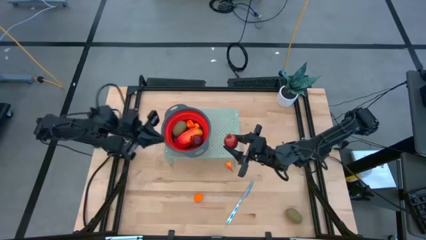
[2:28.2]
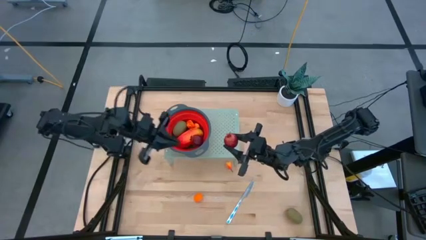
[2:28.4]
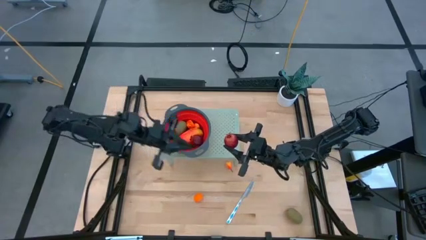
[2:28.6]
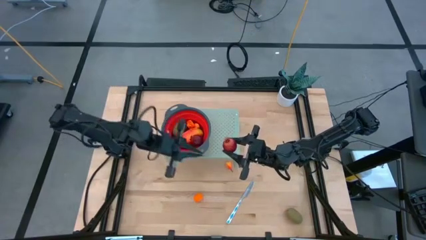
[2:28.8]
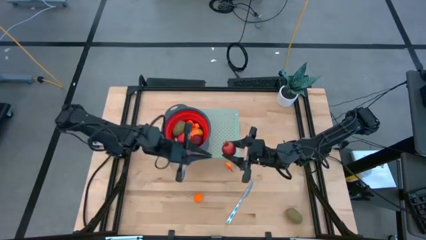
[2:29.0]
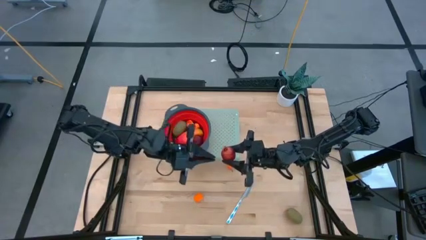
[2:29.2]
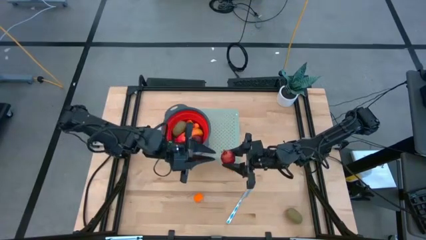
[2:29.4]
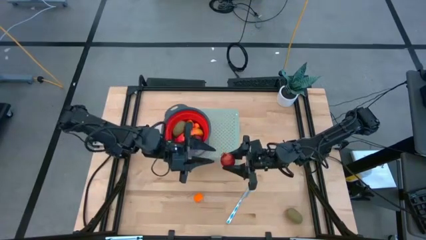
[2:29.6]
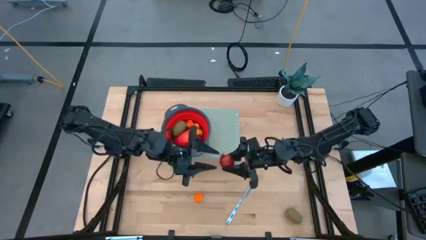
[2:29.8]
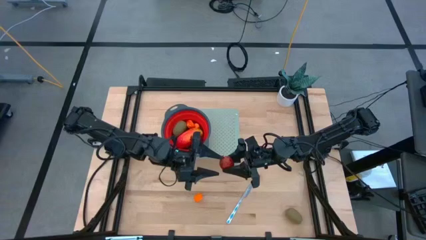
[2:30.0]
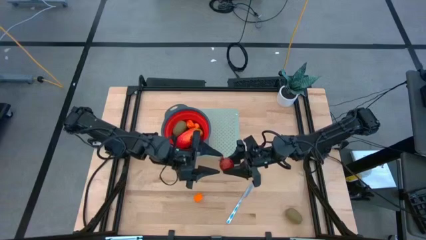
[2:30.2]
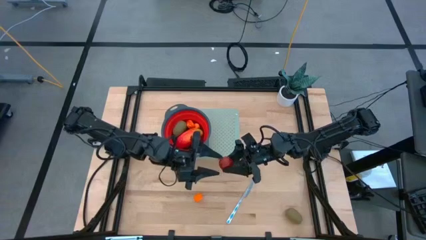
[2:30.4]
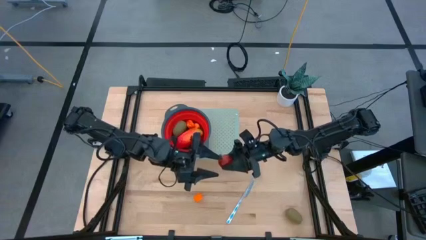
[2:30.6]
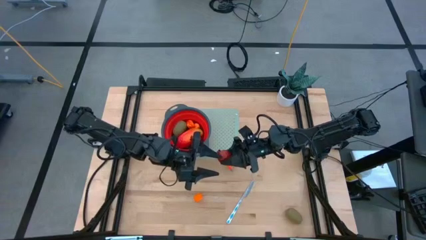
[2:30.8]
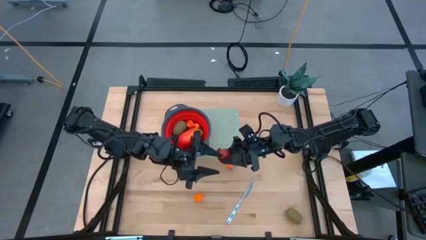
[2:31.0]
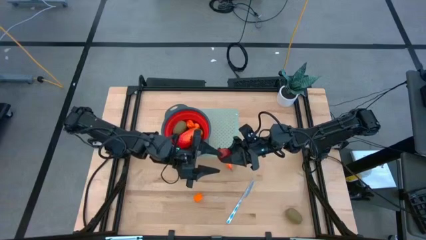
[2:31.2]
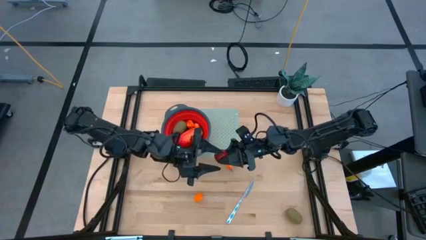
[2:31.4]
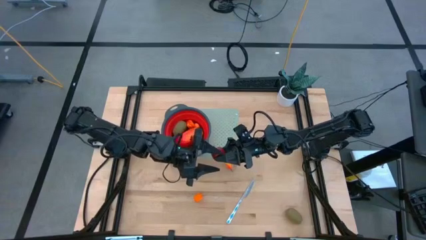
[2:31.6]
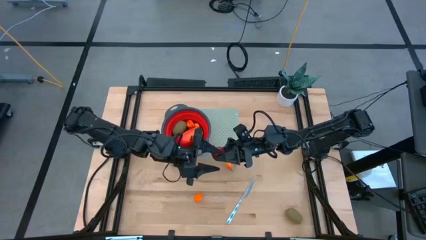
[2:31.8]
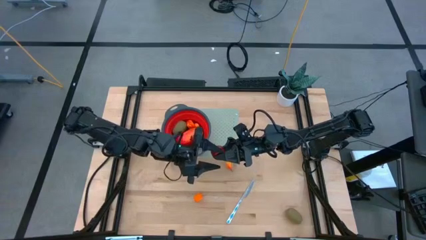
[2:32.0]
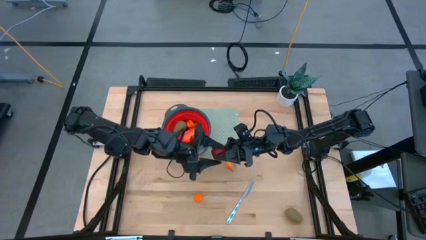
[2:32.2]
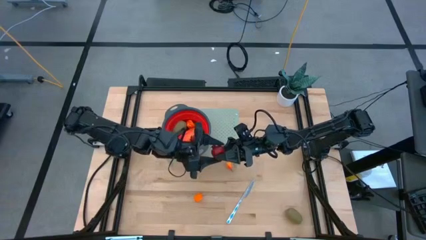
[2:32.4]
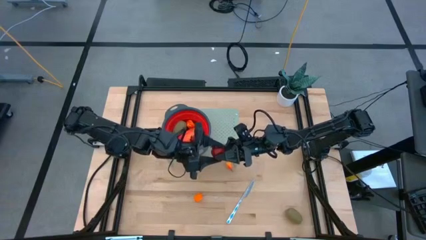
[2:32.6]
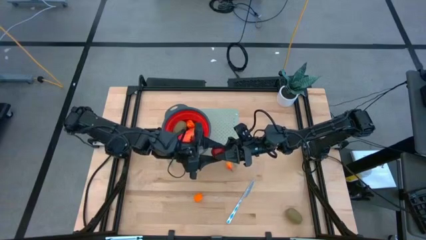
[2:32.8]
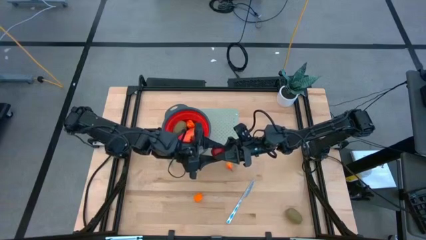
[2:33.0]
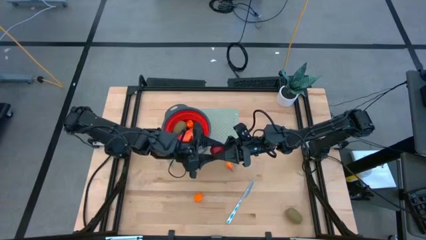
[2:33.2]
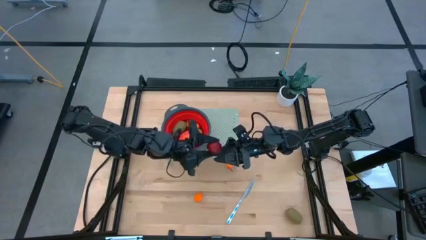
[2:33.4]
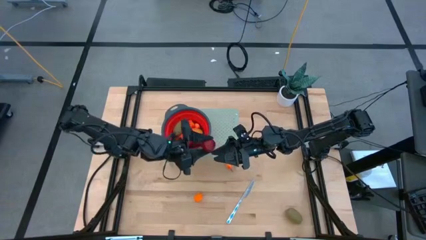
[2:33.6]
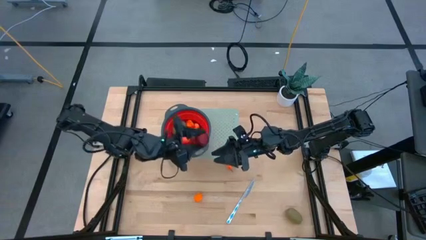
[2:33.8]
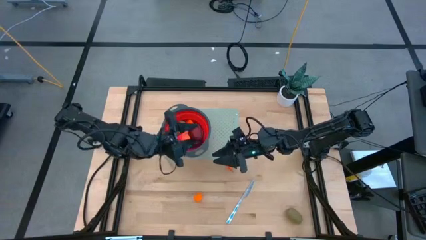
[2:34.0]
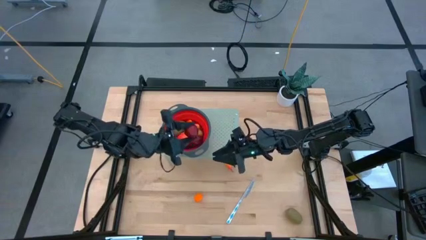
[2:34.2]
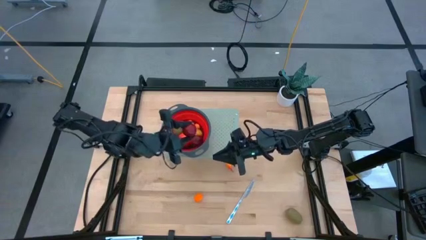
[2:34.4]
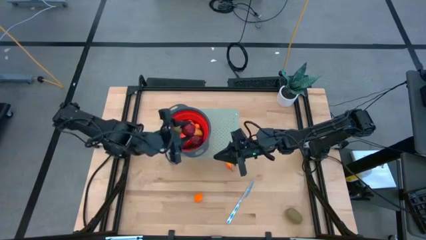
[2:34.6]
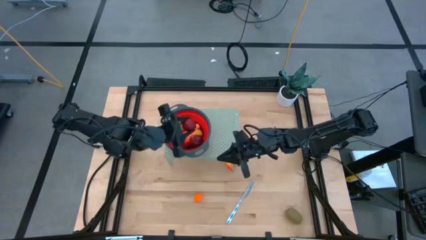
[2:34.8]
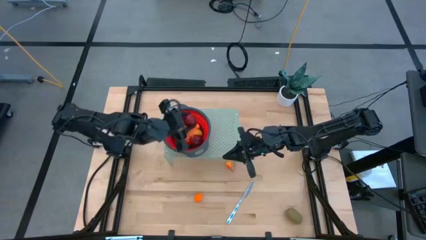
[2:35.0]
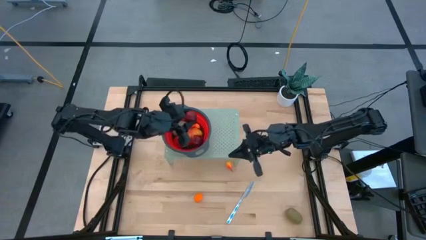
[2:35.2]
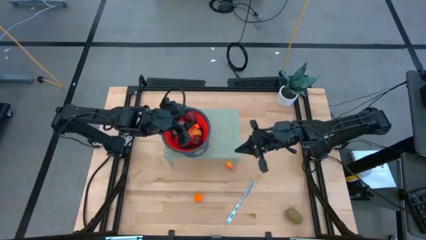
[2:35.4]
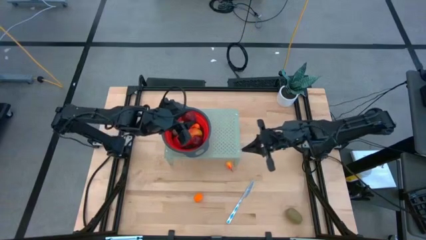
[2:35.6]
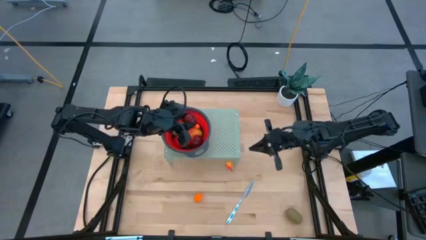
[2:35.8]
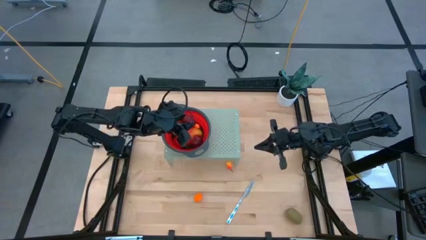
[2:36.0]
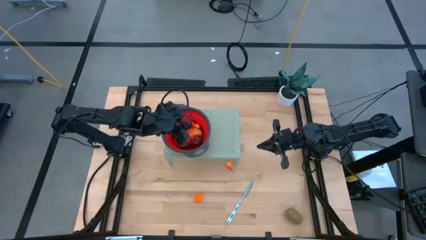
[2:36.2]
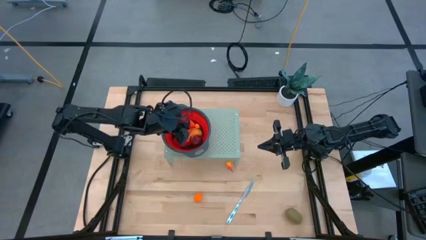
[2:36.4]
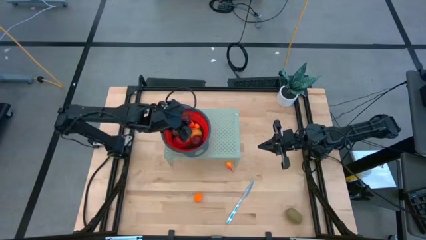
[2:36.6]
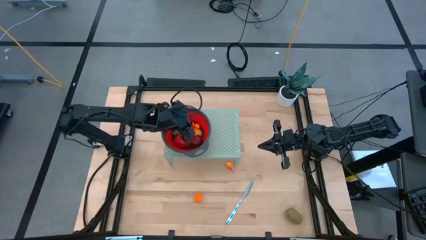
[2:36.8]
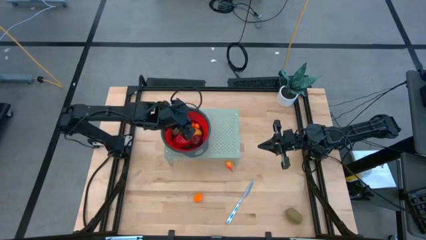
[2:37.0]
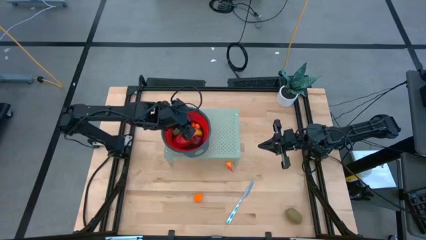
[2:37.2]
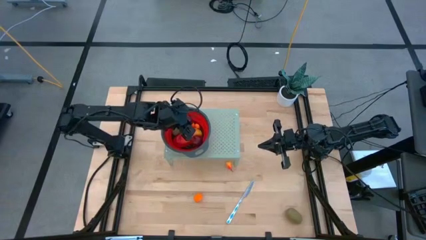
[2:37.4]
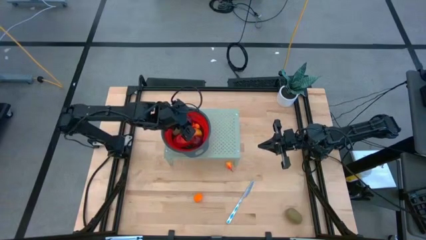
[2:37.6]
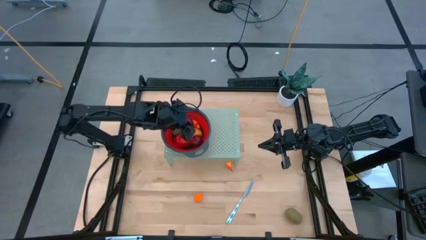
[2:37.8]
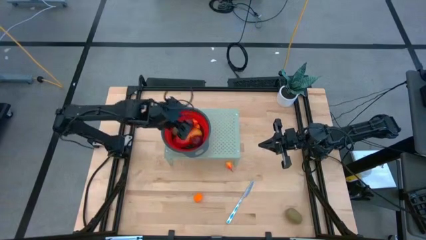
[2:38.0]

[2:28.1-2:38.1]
Task: Pick & Place Fruit
Put the pomegranate into the red strainer bowl on the shelf

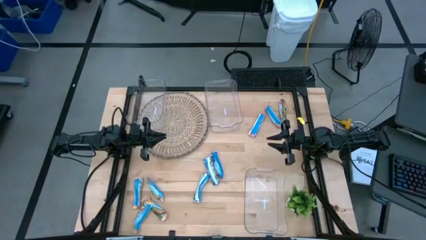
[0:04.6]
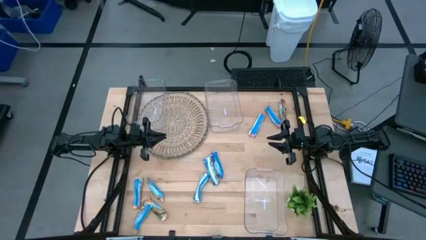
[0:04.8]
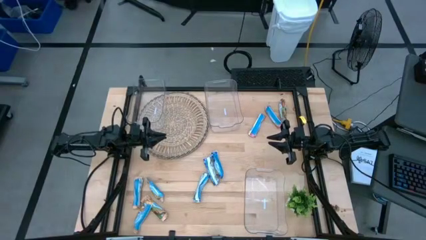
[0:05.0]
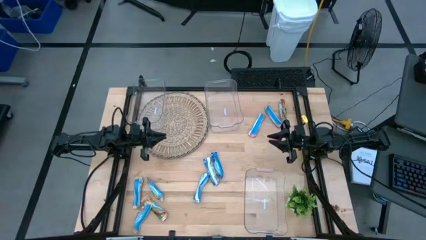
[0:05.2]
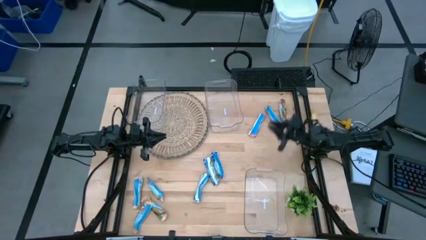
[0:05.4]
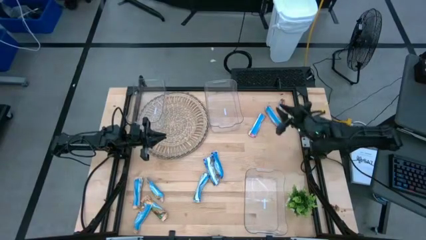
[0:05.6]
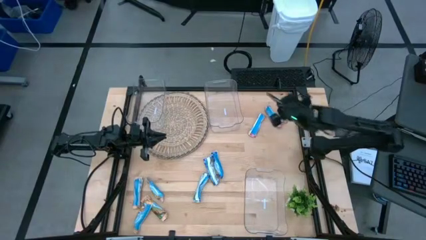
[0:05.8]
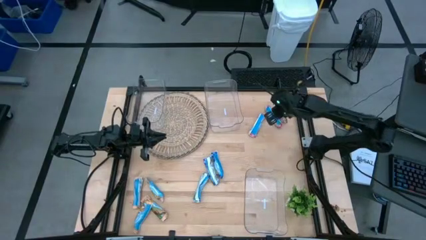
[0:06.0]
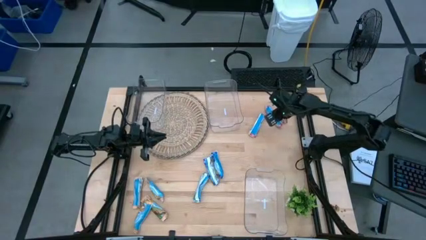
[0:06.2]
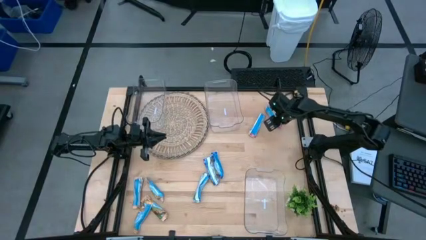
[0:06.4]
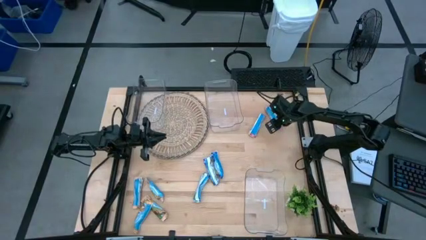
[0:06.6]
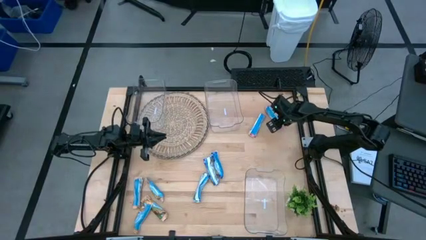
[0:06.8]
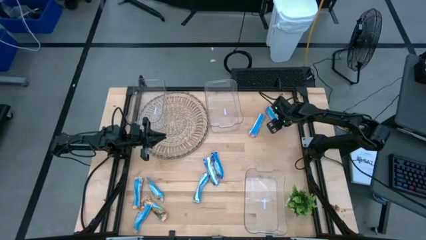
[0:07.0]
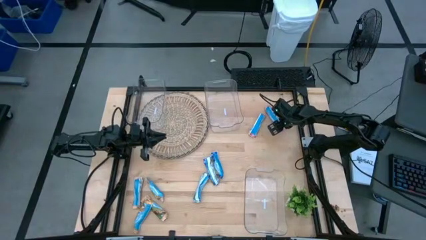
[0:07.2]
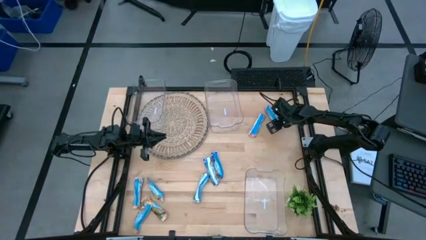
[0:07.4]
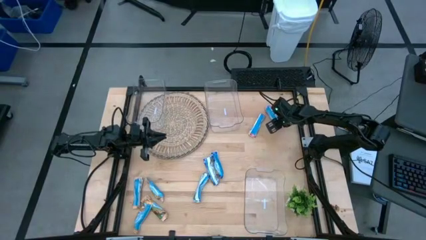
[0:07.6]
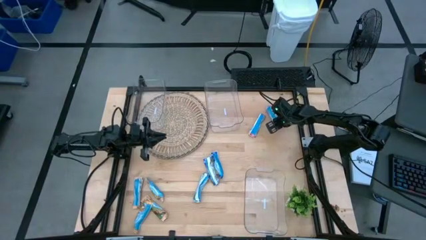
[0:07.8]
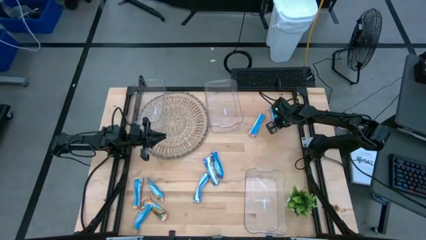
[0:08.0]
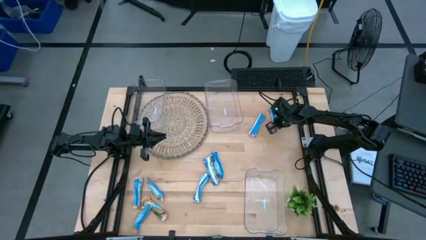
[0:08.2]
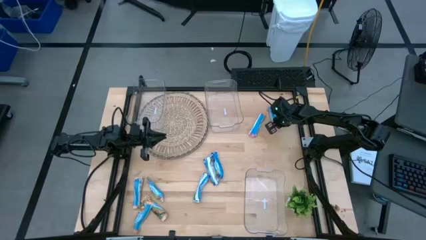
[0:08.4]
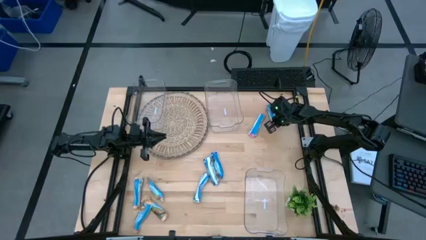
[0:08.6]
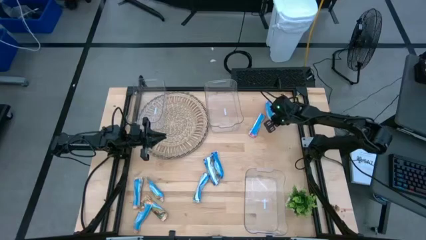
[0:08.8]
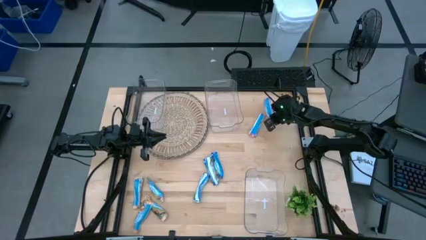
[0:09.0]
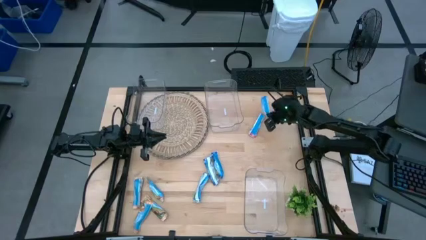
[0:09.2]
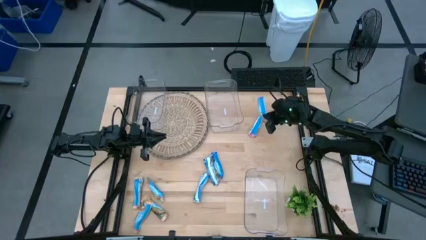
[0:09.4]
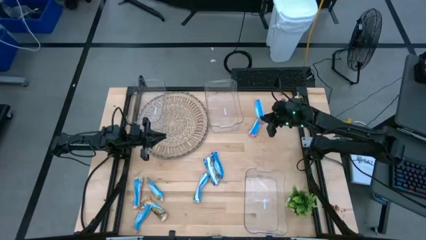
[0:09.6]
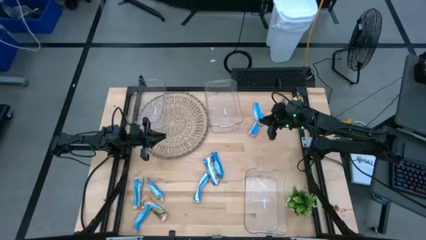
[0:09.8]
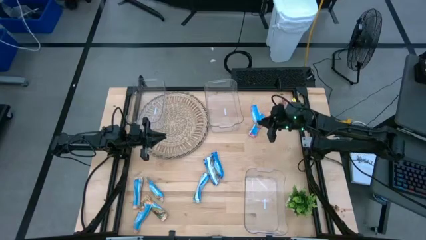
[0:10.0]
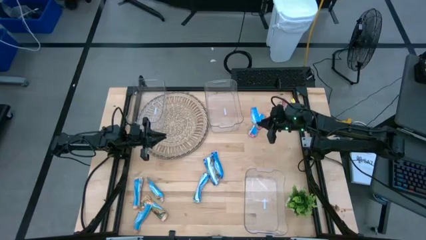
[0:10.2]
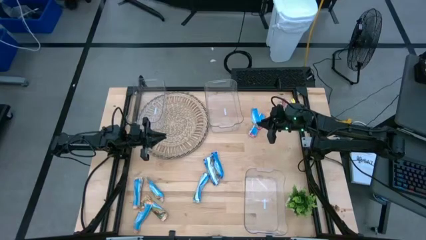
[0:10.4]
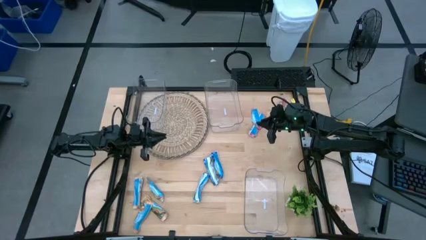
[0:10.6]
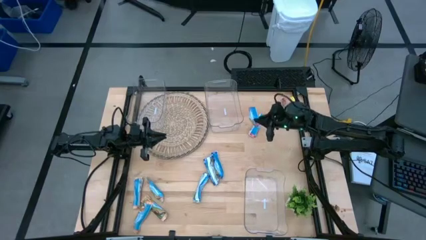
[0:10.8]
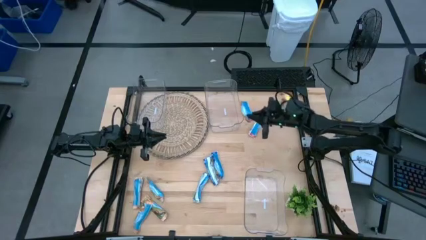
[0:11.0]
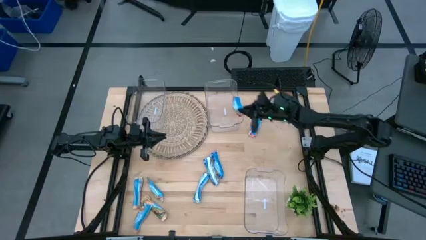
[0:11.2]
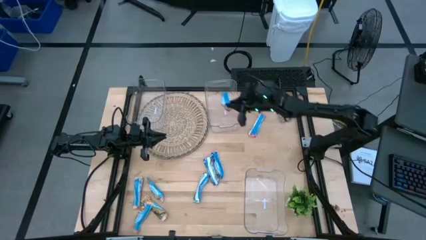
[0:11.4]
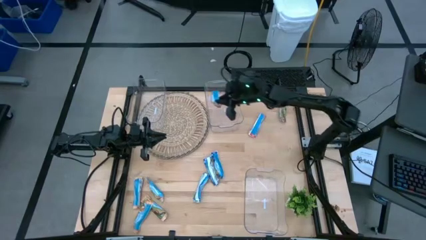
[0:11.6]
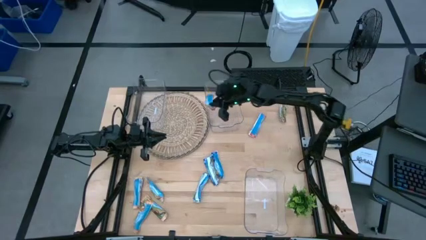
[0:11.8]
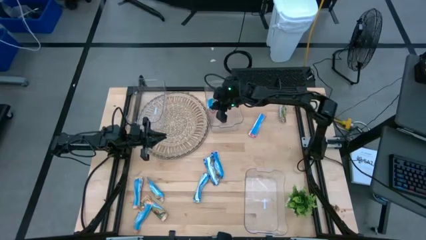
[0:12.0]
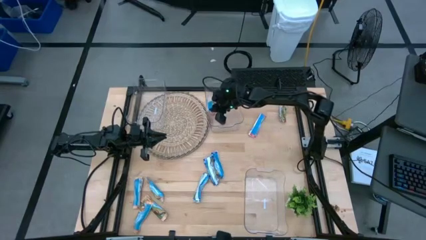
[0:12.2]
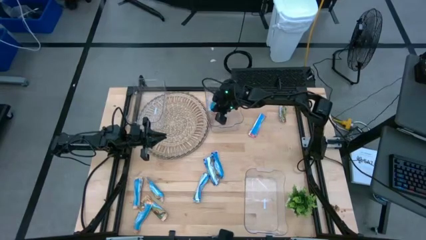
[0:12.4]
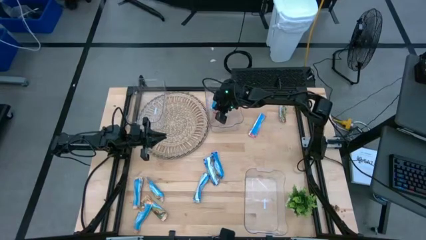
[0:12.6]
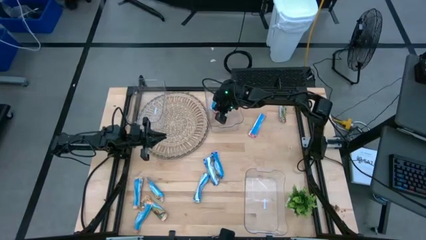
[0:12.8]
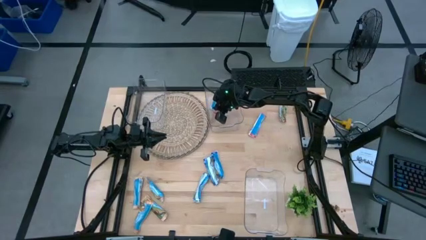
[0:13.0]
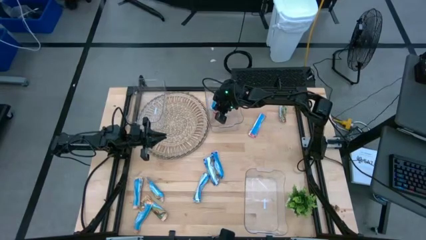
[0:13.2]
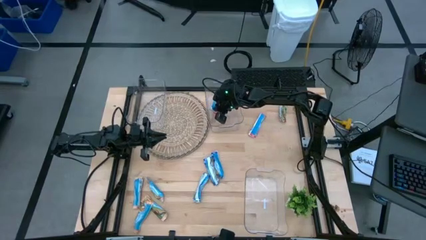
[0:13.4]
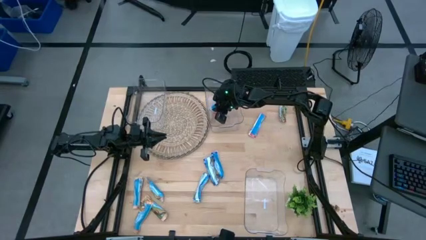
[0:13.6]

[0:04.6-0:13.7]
Task: Pick and place Granola Bars by type
Put the red granola bar into the top right transparent bin
